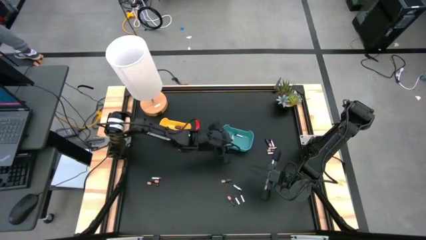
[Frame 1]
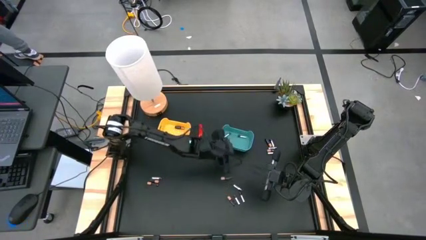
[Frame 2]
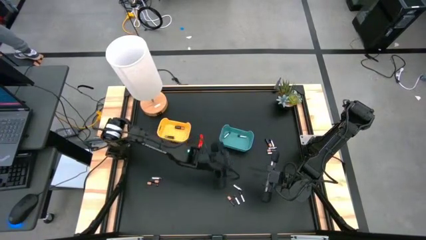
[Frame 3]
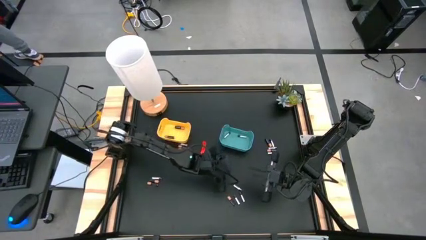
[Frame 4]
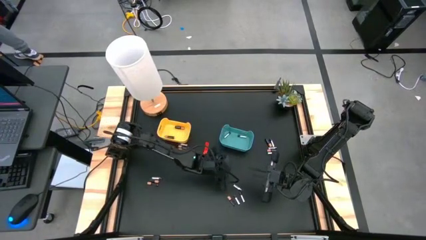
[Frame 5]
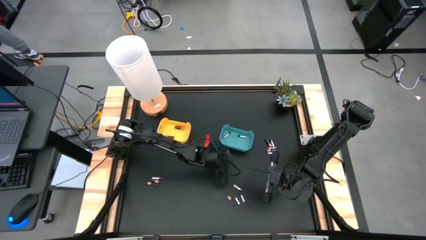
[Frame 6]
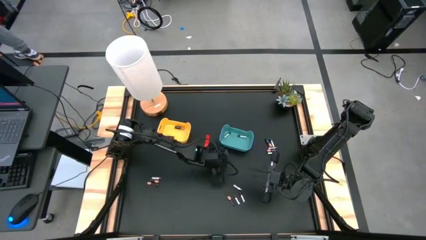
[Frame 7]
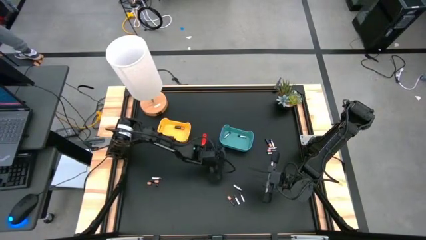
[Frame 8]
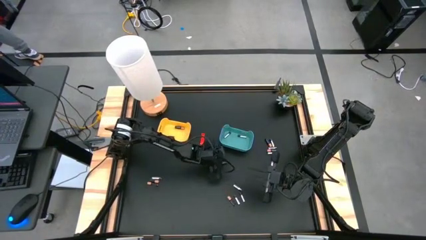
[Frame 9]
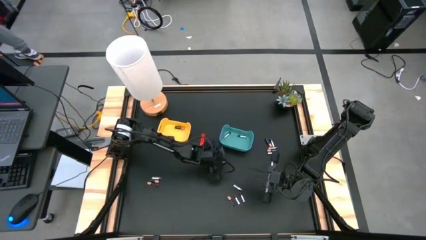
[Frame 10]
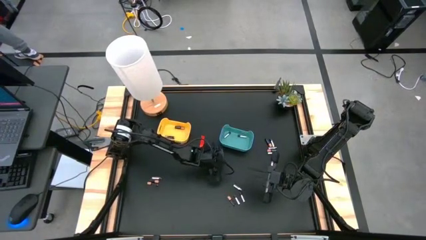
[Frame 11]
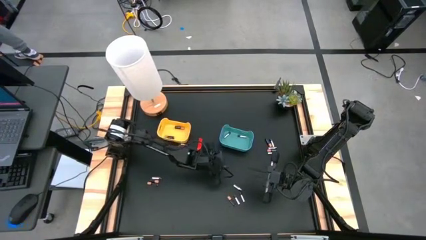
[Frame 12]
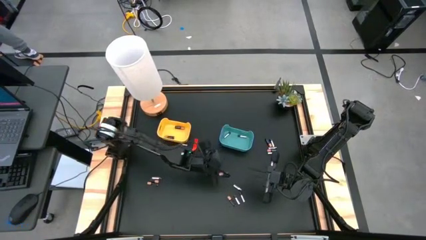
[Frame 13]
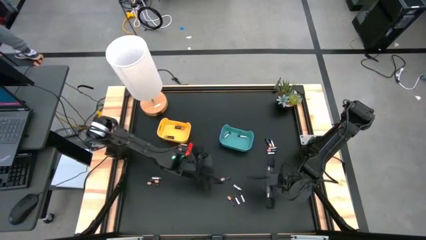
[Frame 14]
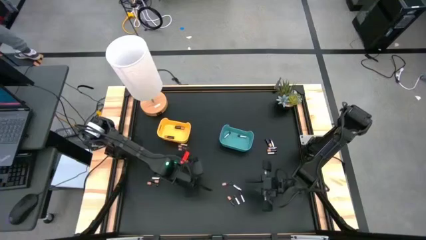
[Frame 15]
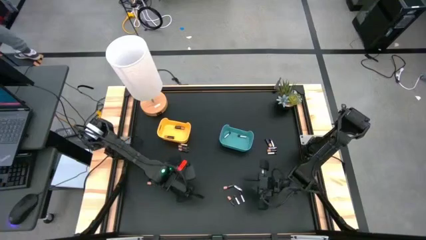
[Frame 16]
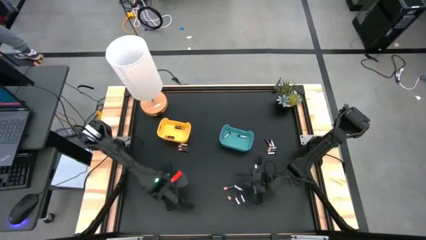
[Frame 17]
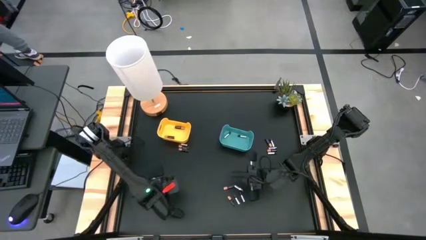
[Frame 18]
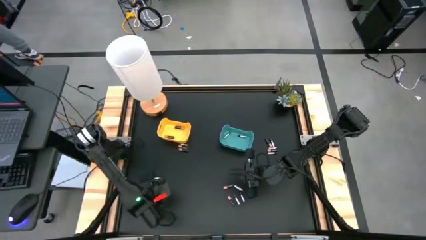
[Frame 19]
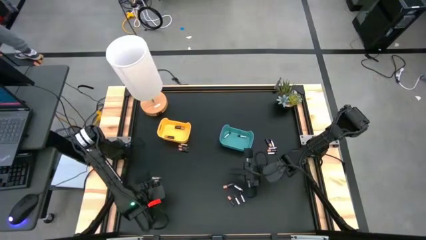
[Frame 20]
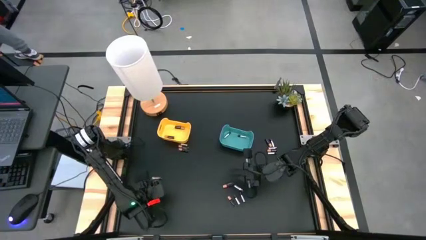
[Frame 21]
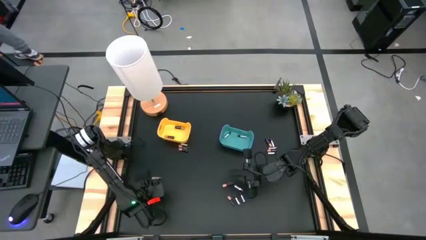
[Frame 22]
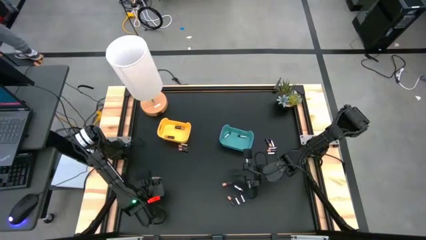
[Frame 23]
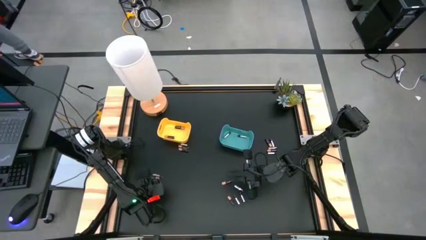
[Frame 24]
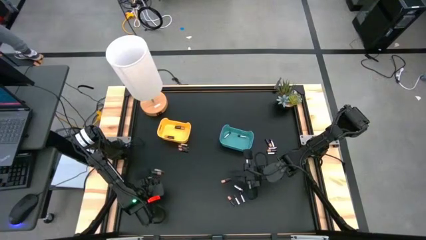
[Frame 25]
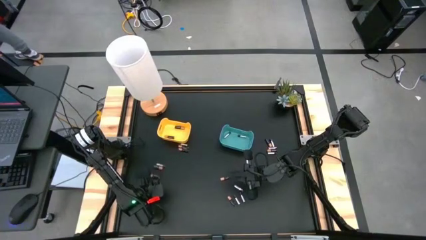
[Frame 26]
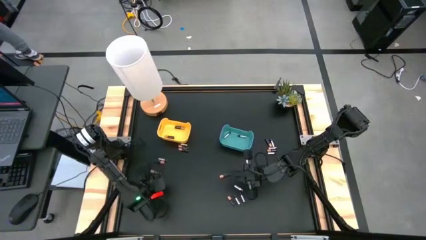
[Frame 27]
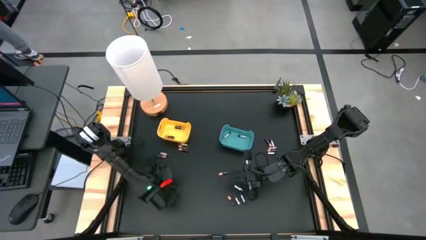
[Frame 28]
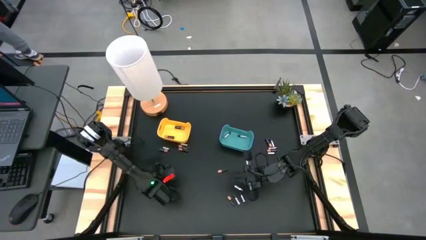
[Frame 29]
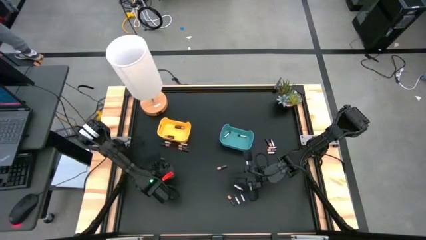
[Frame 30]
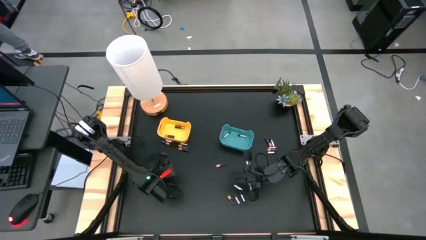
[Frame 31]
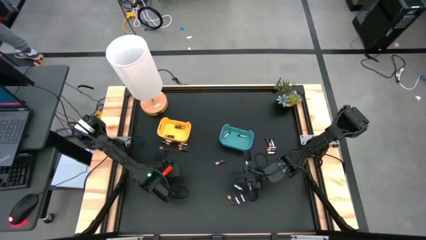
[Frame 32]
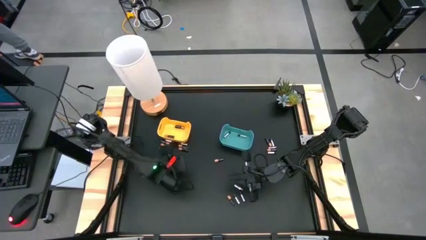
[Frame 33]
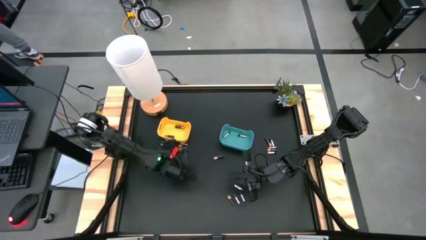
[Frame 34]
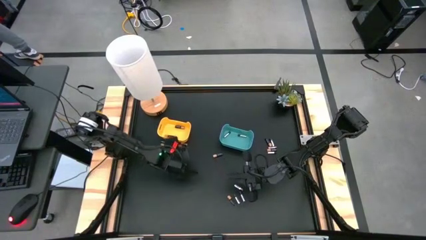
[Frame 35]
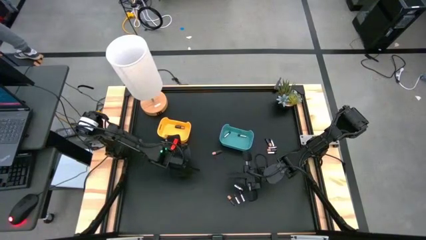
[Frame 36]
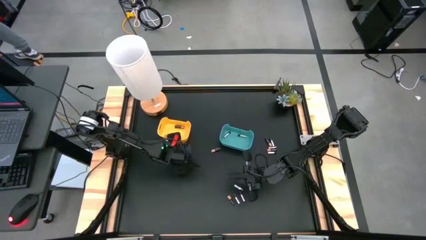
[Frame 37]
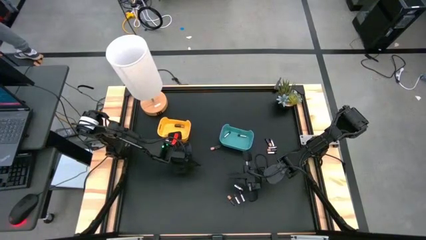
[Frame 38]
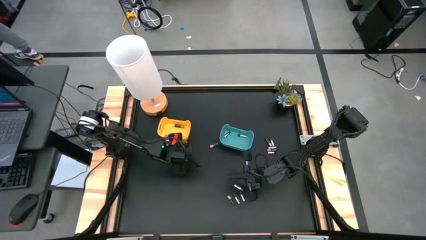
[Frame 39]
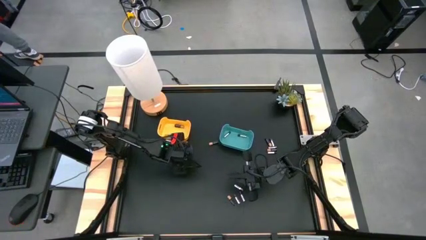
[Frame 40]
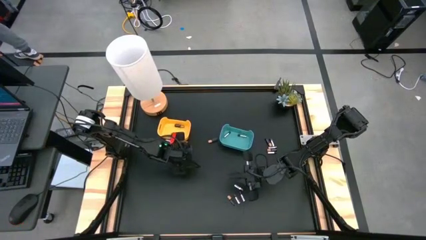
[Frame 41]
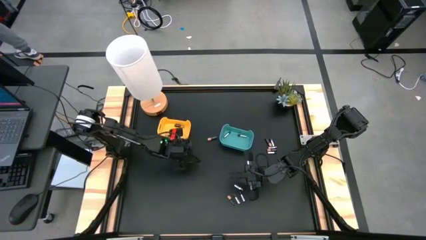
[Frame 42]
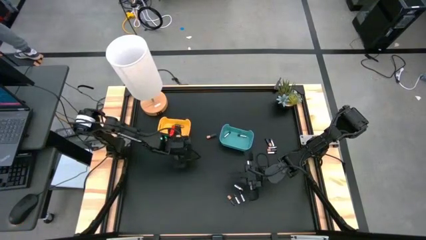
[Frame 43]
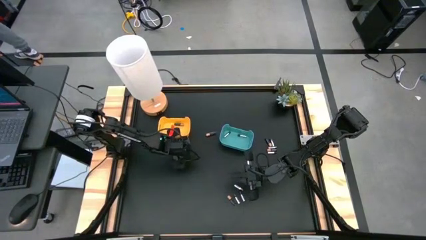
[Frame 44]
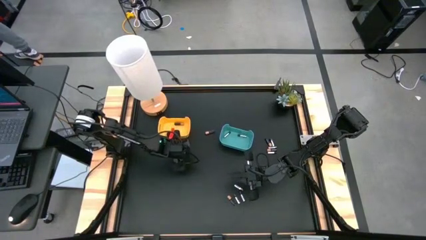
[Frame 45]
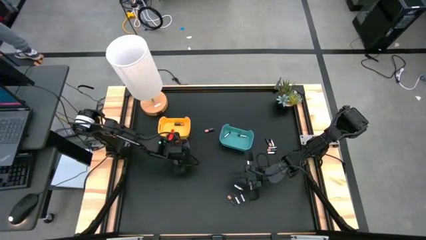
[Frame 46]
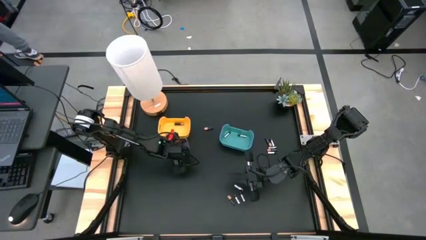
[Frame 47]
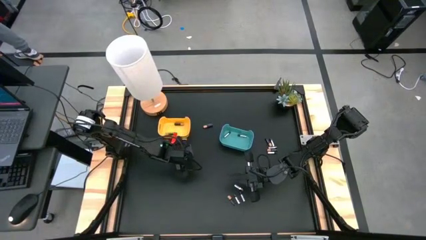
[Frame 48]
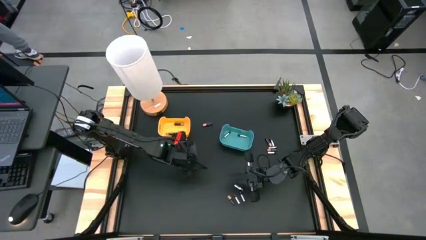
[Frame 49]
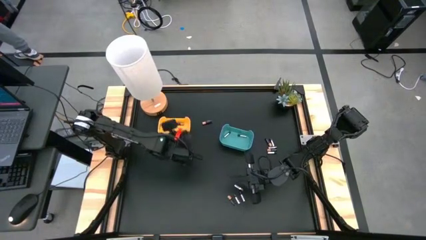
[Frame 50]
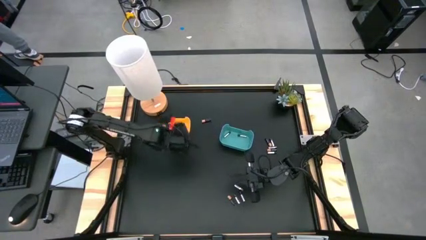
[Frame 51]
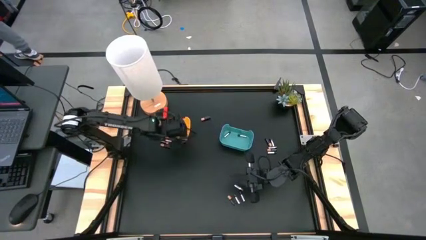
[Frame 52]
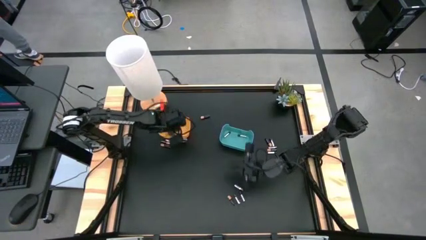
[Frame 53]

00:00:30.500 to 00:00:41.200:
Task: Sort batteries
Put the black battery into the yellow bin

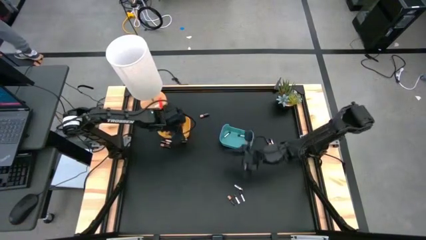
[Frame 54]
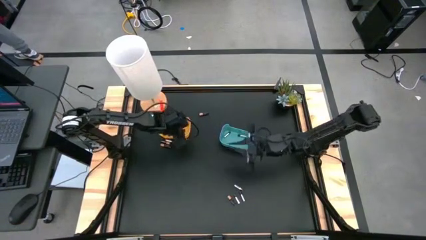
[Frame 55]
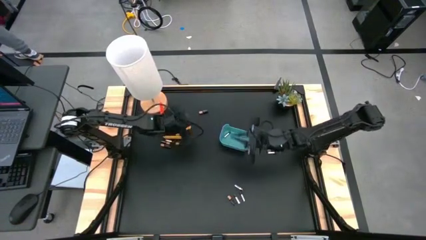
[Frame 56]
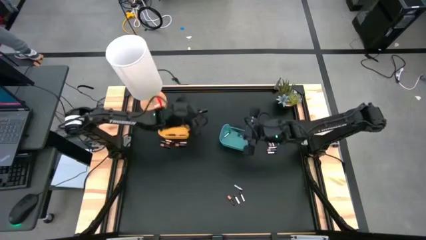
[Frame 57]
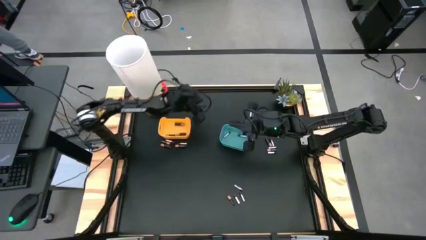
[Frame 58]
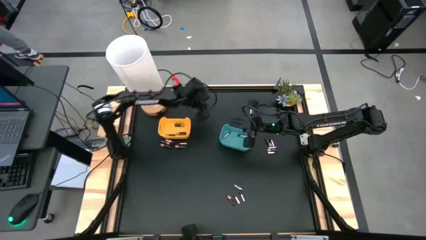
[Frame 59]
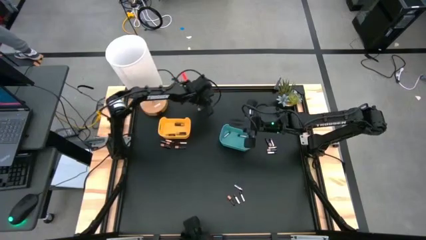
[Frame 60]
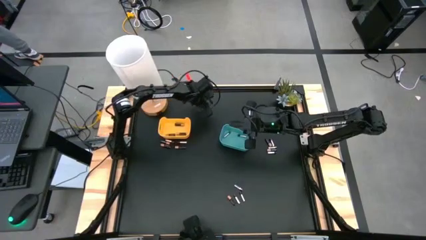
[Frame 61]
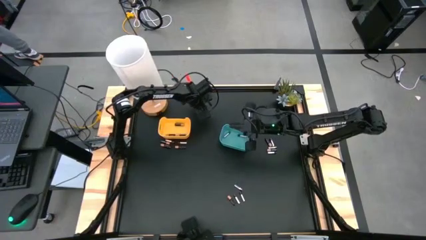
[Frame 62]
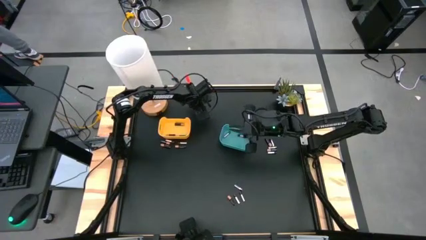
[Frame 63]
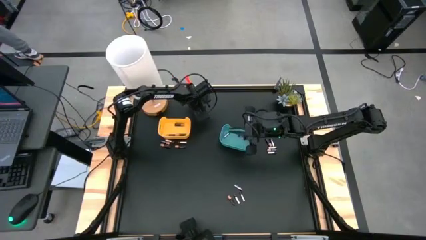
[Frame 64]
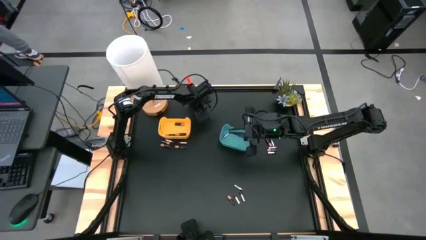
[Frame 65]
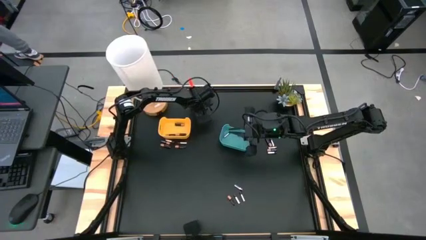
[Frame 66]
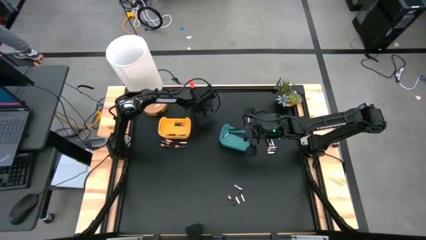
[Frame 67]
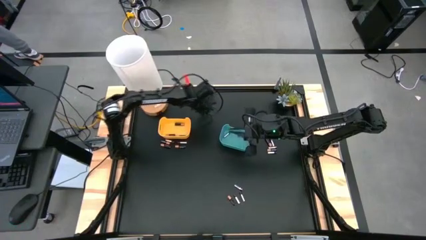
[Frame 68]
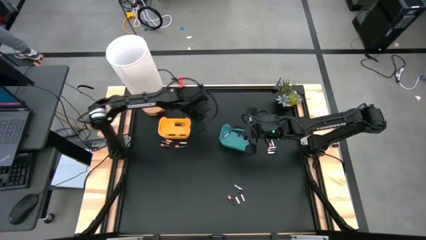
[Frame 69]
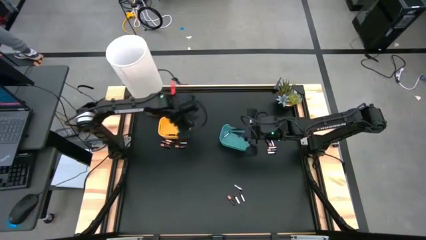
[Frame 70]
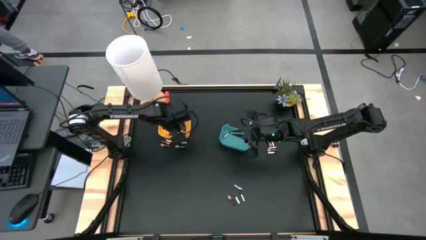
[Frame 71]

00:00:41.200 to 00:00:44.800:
Put the black battery into the yellow bin
